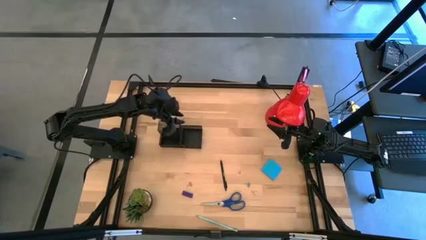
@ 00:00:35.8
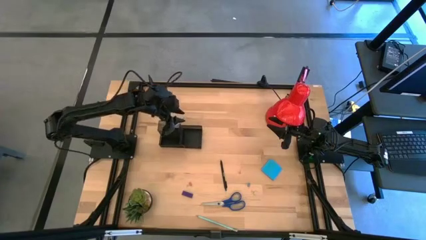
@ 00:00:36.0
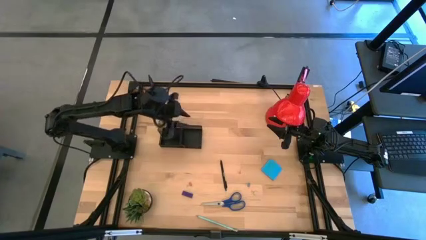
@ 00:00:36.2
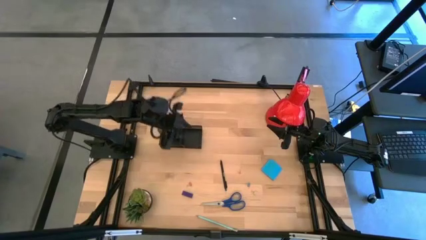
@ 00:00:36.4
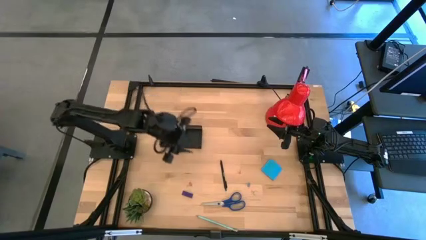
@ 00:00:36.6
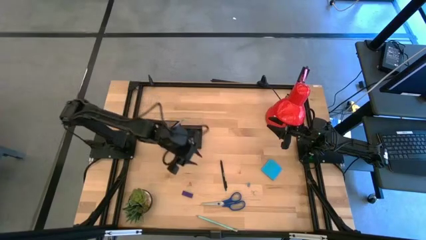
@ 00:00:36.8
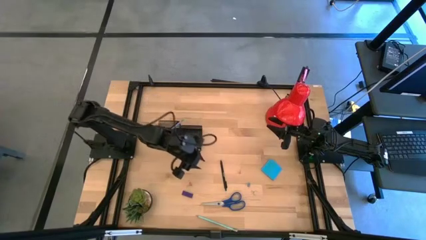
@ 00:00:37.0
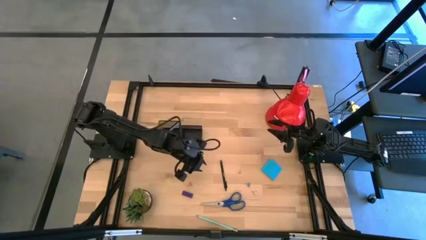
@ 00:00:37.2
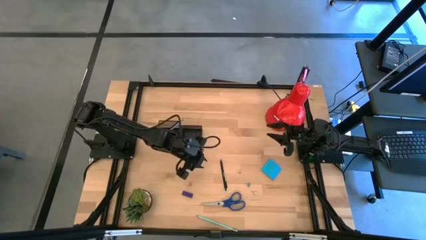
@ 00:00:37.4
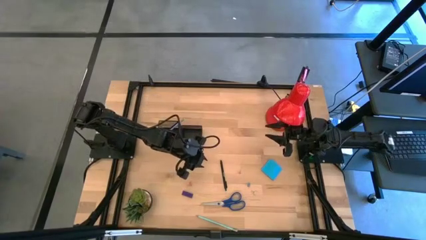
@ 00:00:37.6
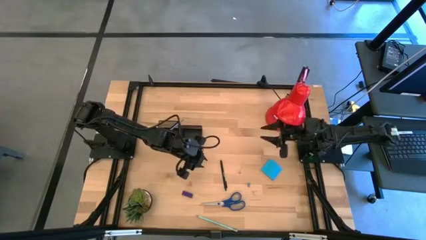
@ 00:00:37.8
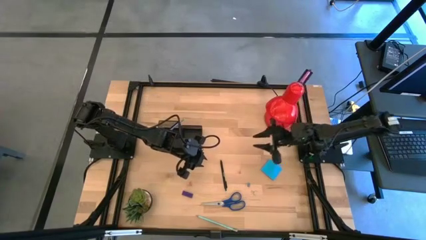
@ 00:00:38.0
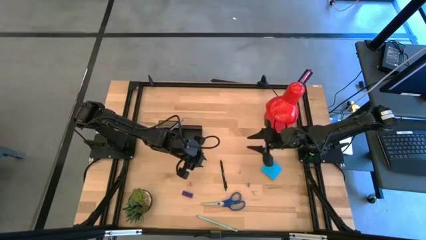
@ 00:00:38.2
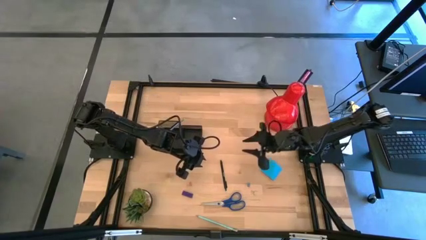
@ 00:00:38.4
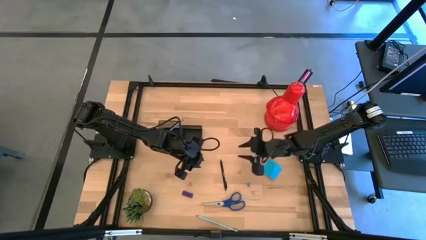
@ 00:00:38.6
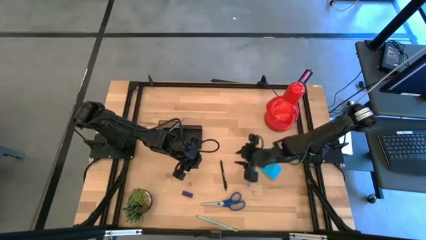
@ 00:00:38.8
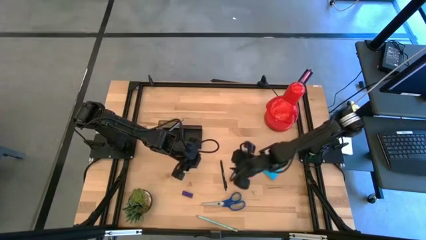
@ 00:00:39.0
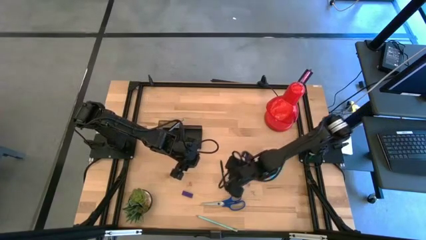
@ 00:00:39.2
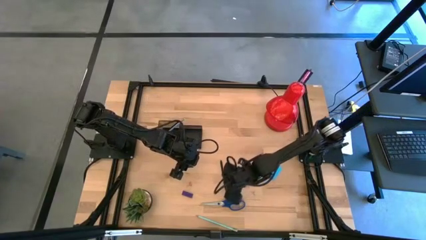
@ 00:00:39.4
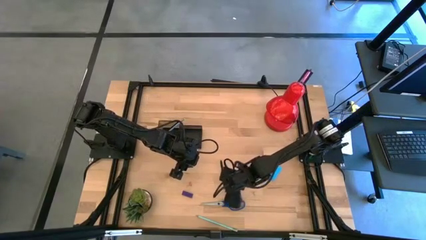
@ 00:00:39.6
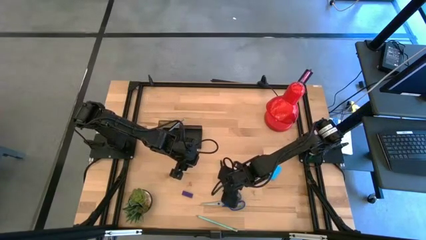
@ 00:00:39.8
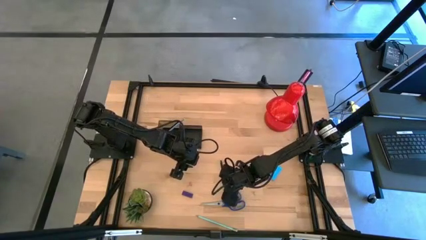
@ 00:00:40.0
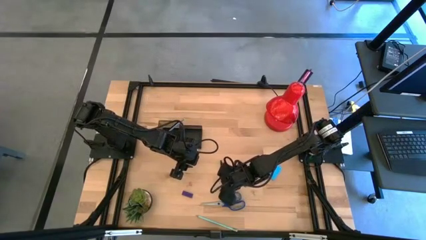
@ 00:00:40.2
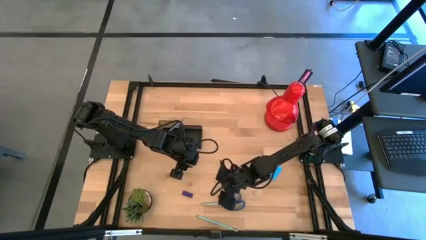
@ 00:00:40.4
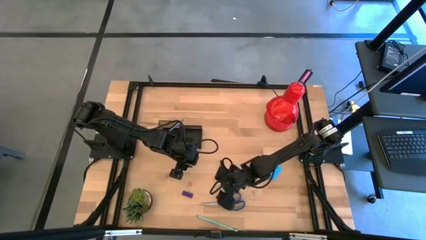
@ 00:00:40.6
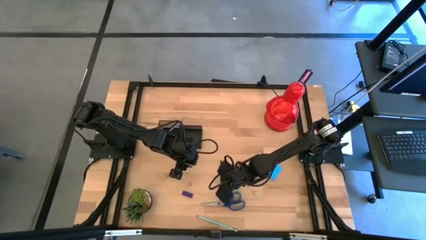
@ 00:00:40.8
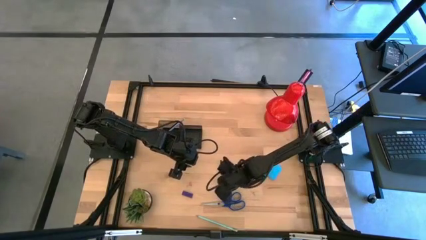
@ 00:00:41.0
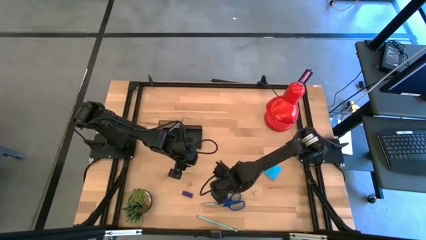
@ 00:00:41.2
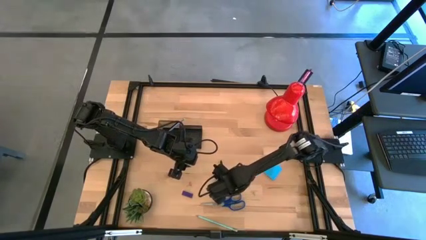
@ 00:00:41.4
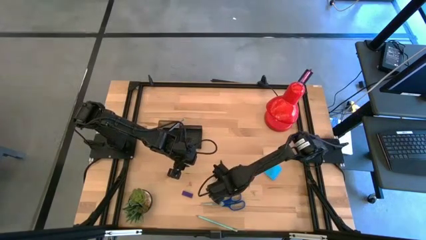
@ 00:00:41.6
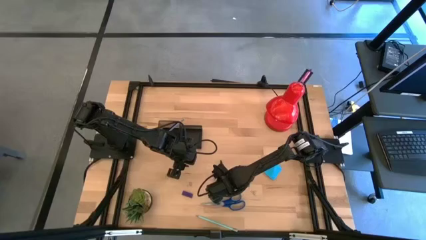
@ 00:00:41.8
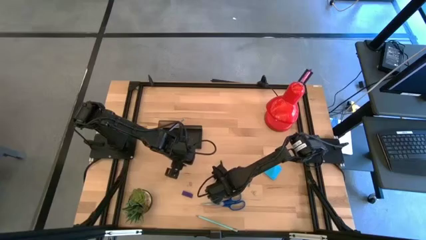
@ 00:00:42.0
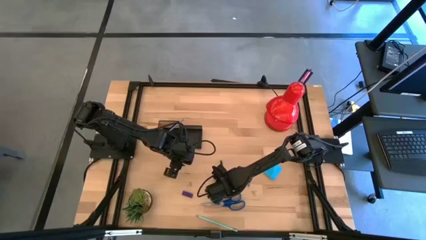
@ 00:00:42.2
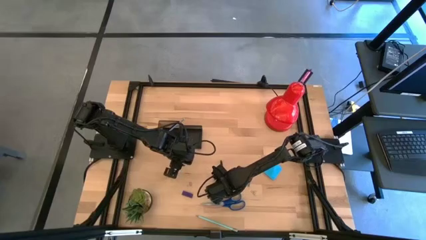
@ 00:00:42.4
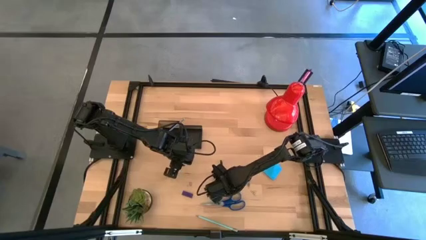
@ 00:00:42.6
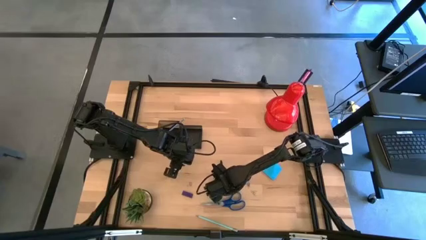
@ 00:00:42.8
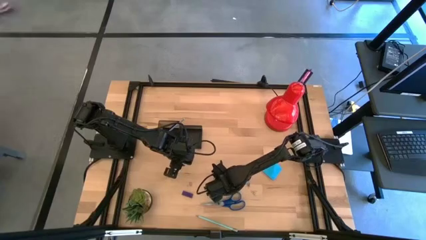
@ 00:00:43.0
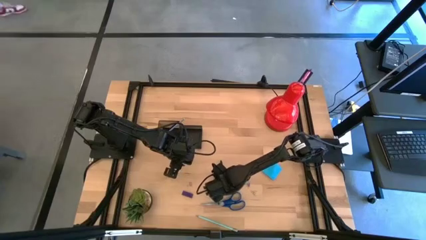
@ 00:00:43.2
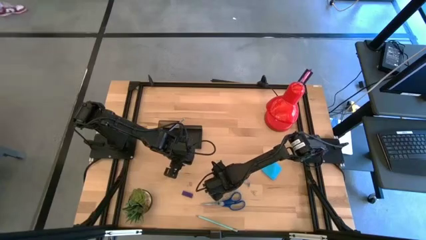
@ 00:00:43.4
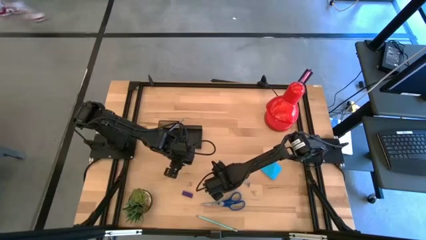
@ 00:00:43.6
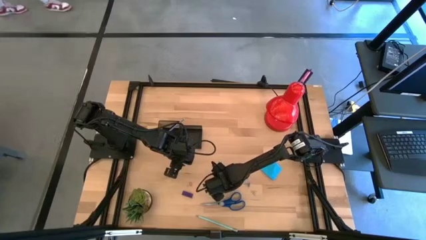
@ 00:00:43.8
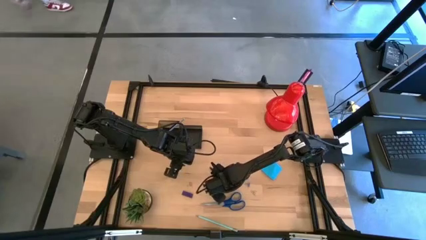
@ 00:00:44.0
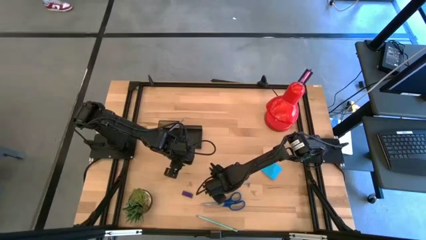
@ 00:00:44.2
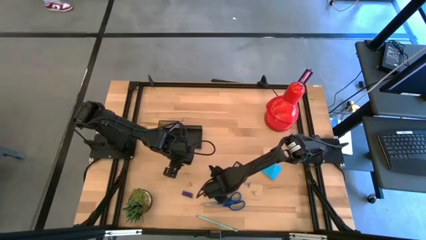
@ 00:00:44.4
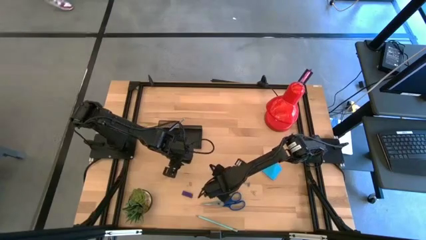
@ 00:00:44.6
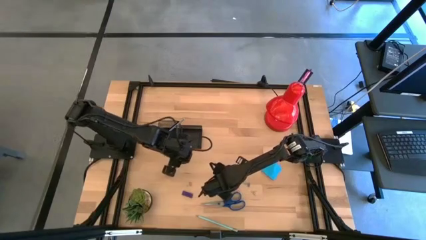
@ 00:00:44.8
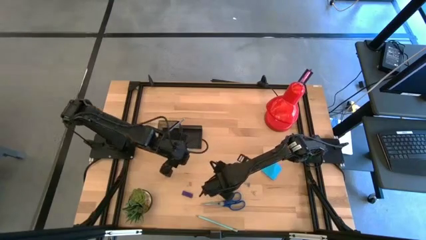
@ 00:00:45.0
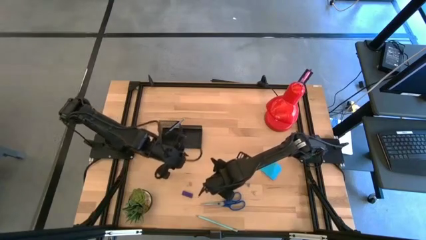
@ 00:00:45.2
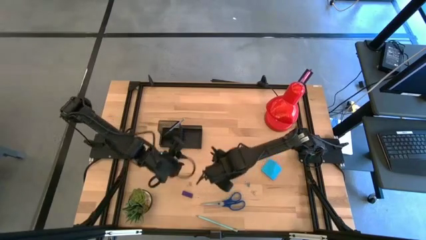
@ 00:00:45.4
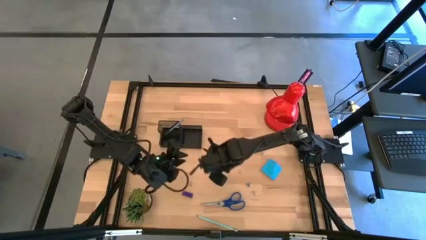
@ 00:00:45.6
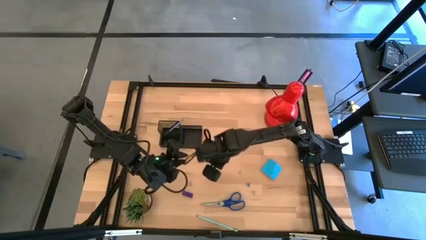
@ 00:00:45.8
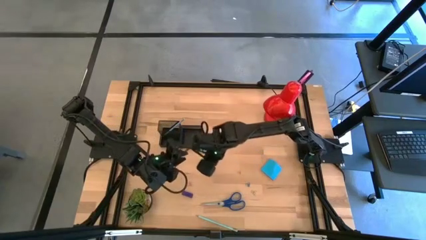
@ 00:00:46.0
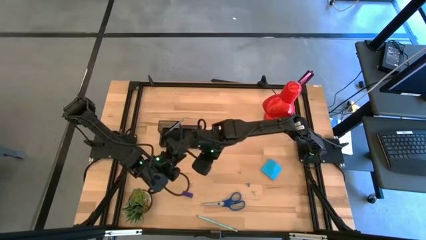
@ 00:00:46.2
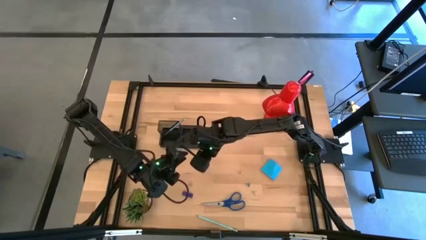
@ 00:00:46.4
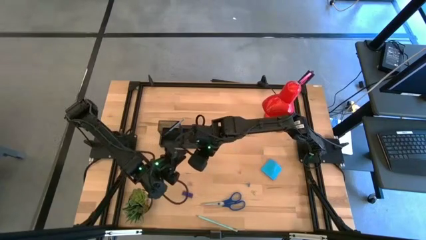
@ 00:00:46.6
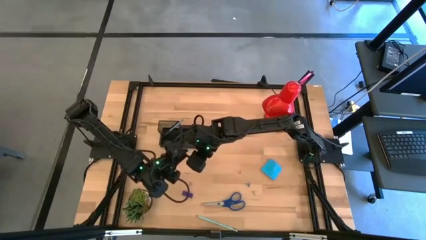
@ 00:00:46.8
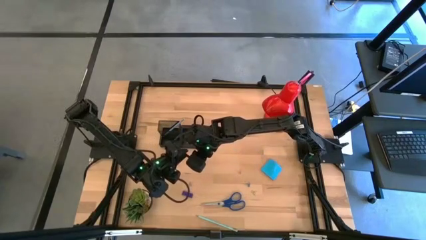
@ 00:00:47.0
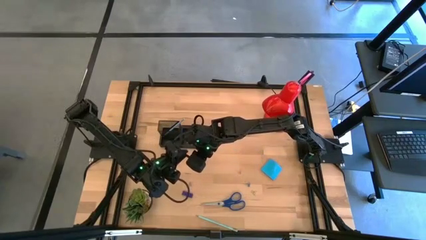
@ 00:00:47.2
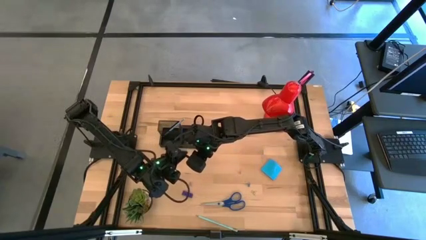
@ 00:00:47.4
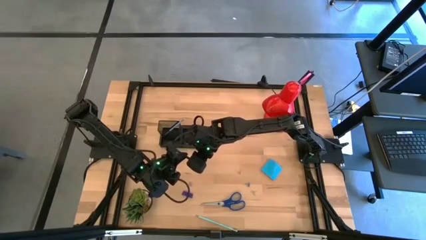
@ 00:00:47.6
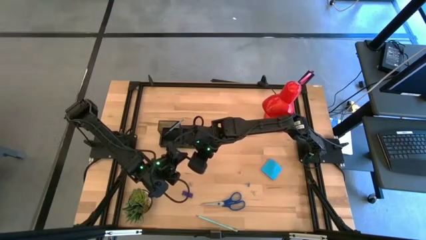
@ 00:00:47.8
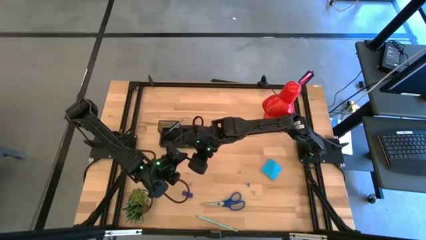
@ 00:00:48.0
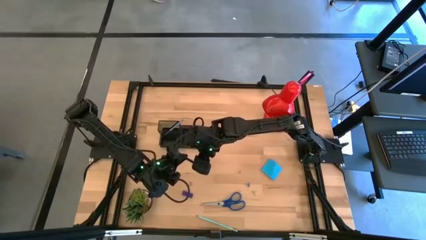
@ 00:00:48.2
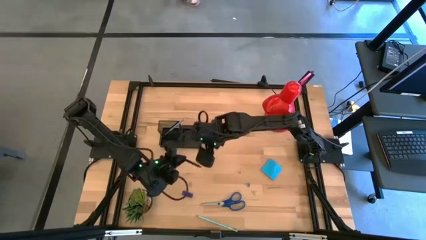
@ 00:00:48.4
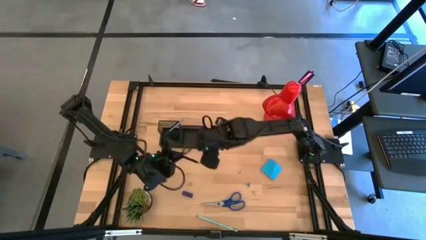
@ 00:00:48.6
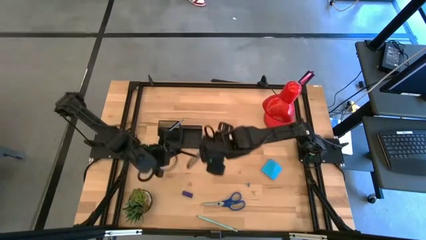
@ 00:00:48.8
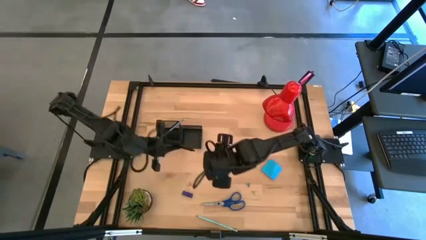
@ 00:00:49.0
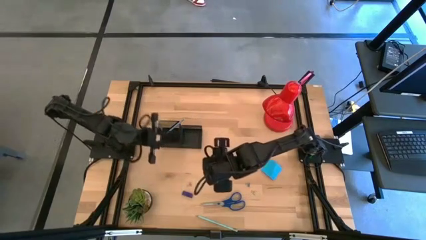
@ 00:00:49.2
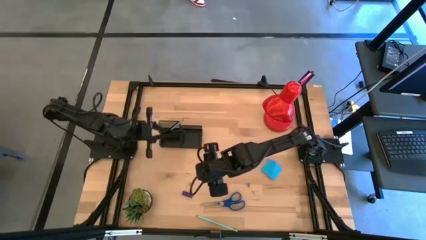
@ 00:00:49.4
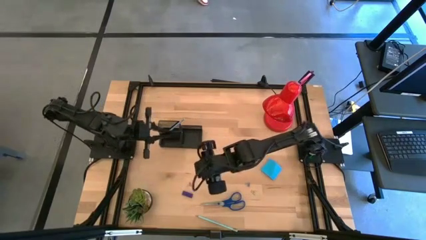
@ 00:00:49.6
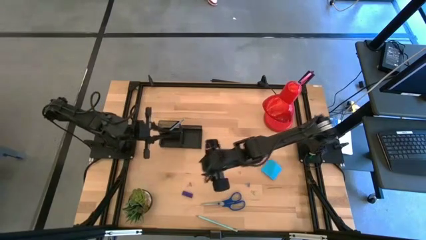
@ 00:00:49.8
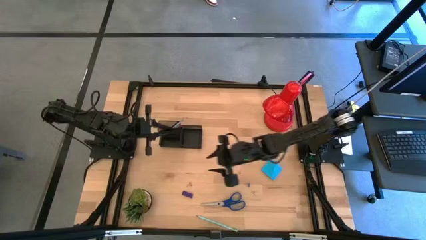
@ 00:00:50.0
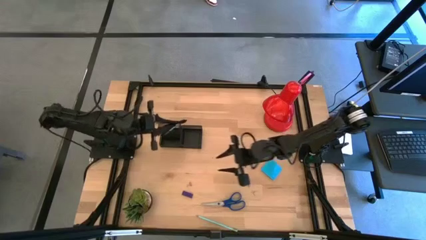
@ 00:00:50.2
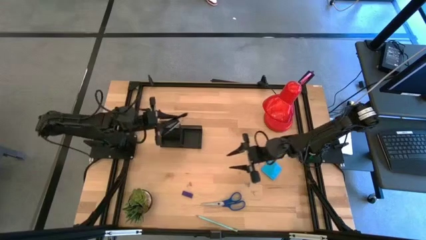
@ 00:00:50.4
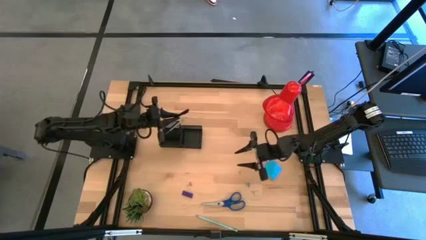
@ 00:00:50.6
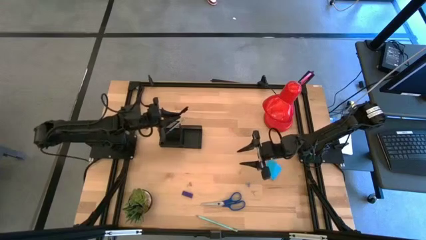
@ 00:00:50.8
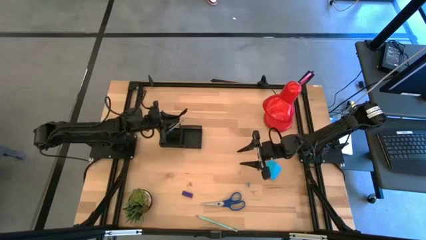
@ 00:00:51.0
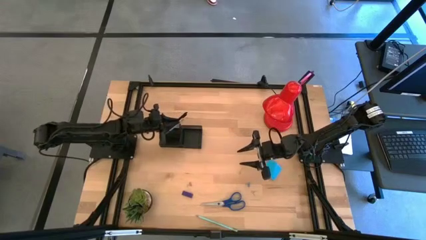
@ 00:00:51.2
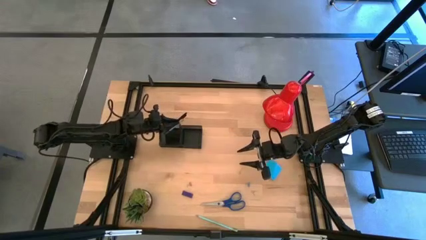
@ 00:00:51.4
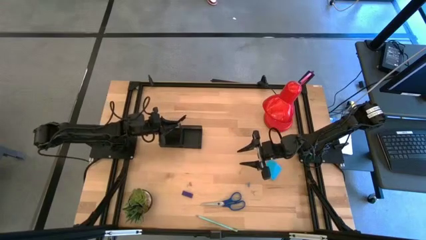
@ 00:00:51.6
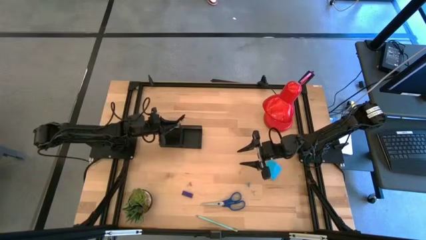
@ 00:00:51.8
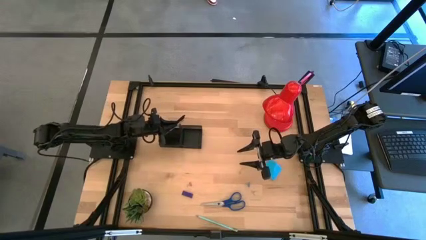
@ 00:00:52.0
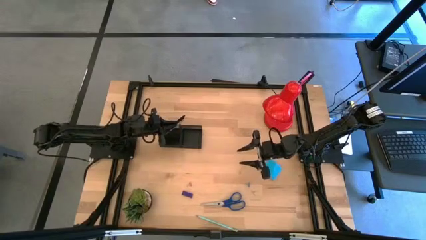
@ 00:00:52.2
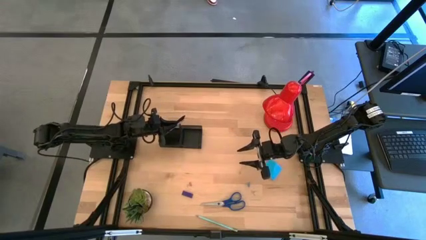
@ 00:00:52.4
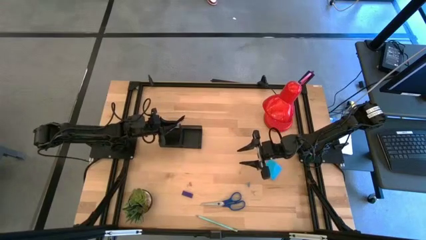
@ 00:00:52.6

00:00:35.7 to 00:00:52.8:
Task: Pick and place office supplies into organizer
Put the black pen into the black desk organizer
